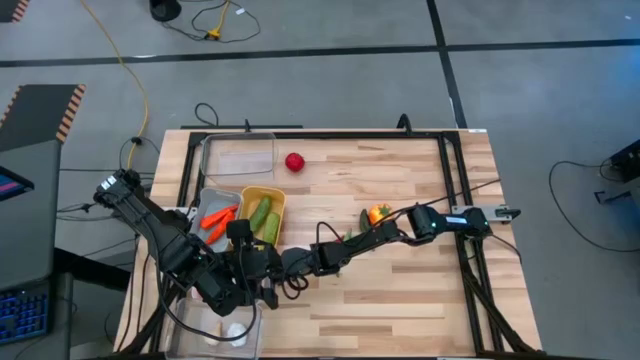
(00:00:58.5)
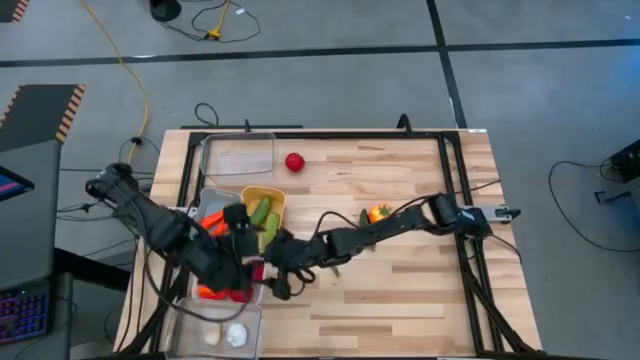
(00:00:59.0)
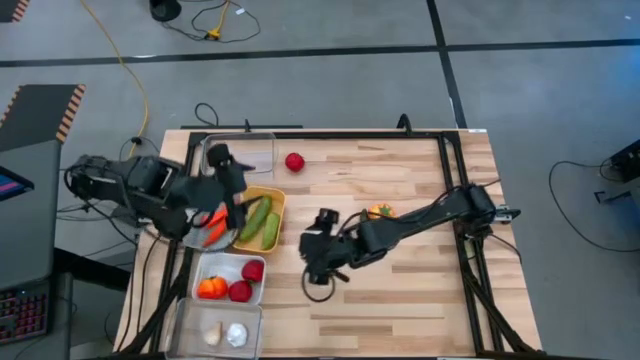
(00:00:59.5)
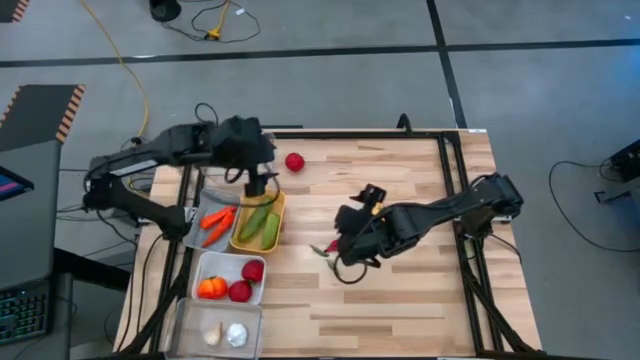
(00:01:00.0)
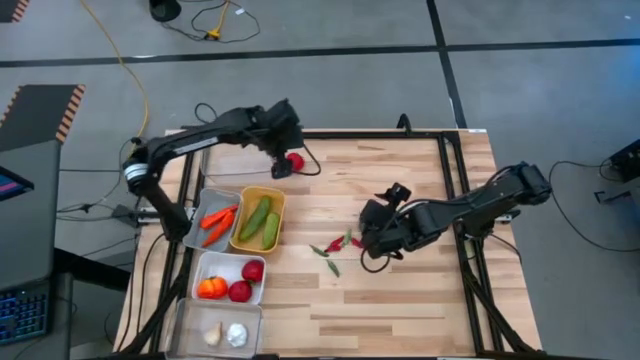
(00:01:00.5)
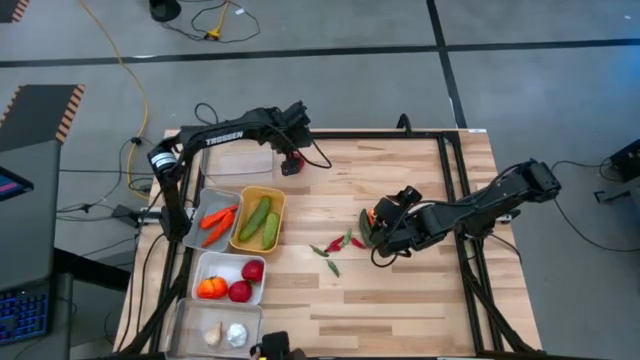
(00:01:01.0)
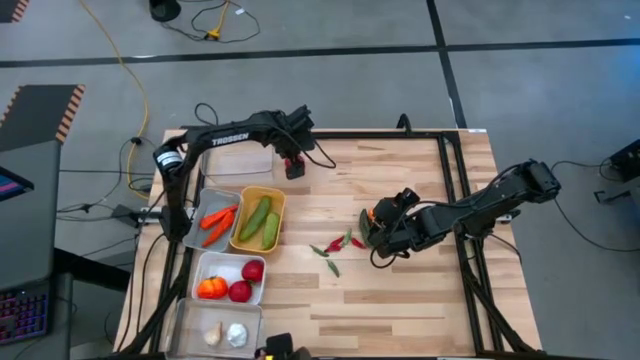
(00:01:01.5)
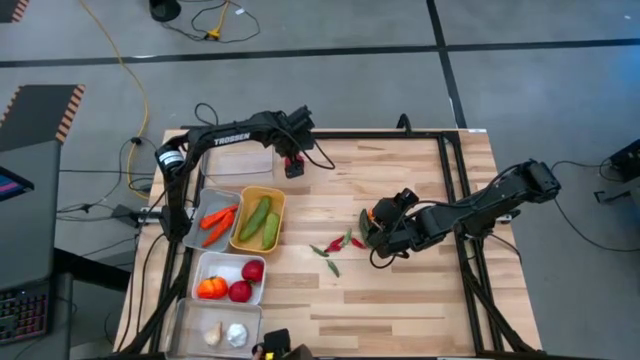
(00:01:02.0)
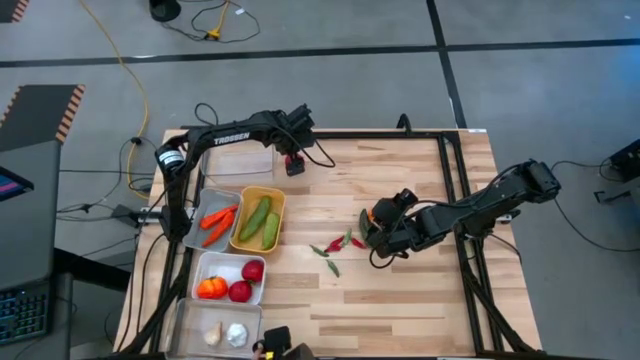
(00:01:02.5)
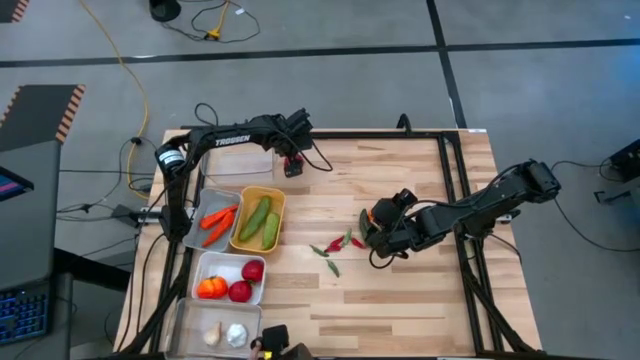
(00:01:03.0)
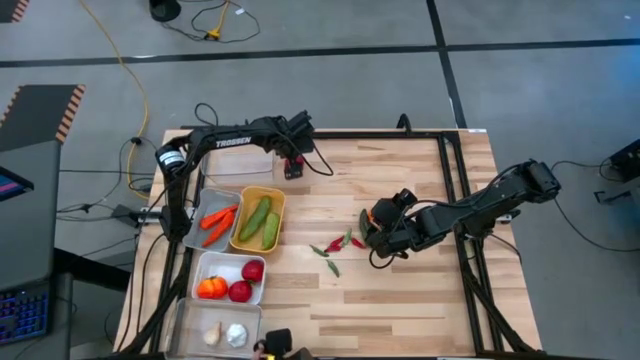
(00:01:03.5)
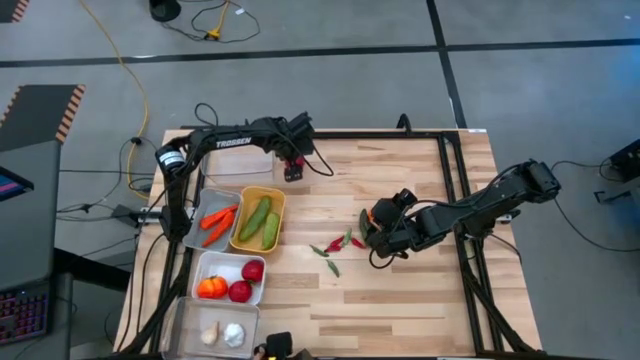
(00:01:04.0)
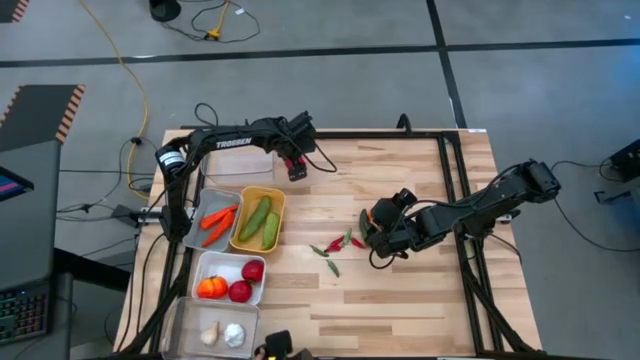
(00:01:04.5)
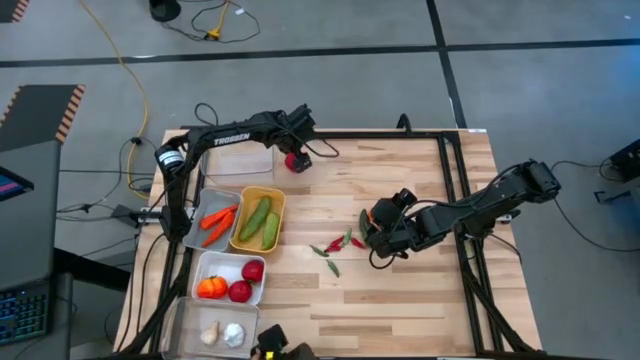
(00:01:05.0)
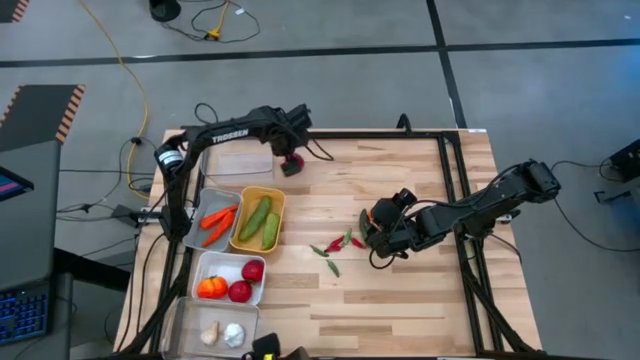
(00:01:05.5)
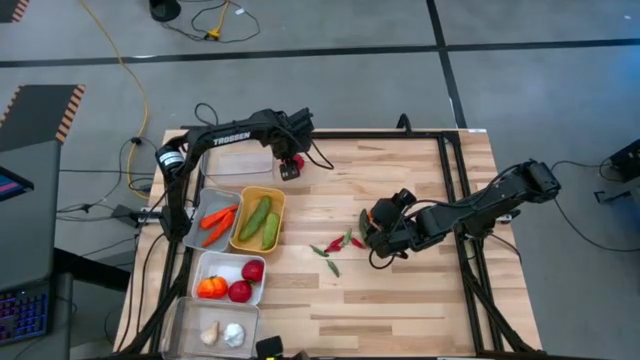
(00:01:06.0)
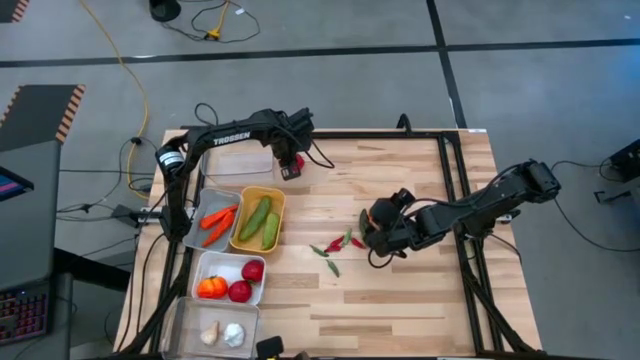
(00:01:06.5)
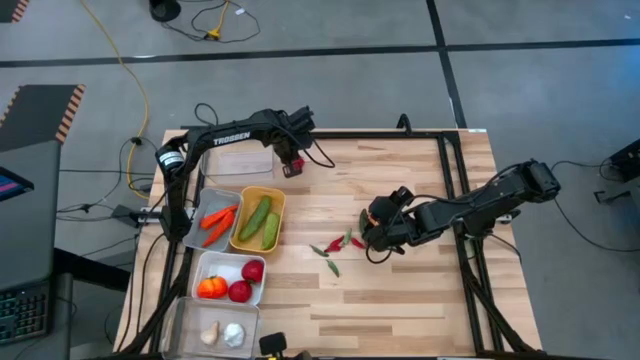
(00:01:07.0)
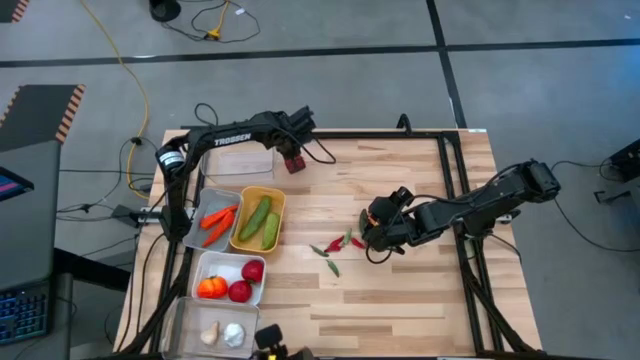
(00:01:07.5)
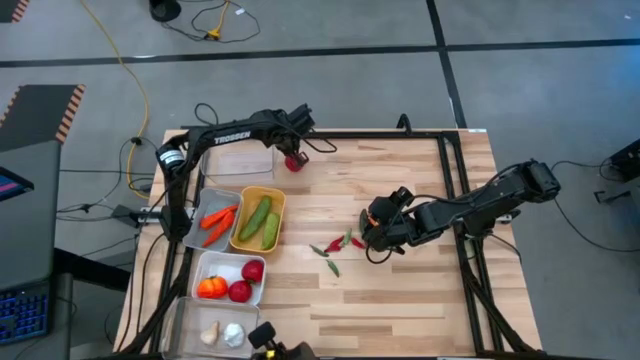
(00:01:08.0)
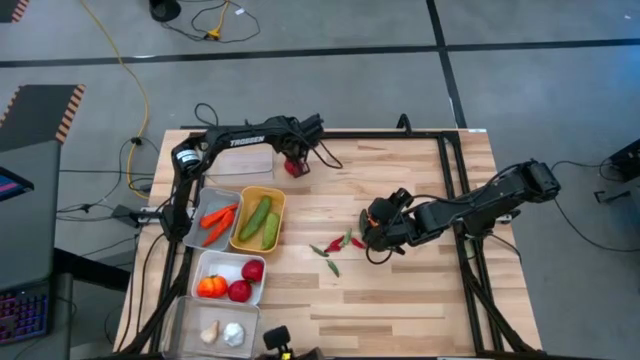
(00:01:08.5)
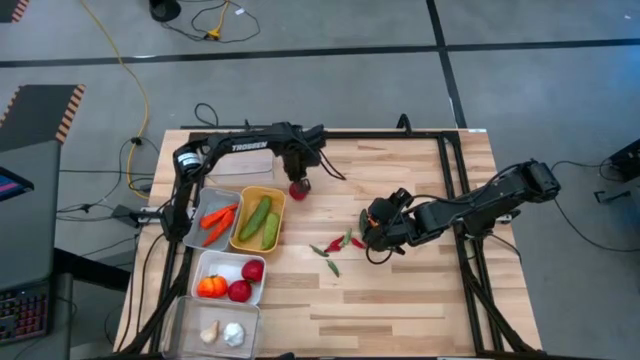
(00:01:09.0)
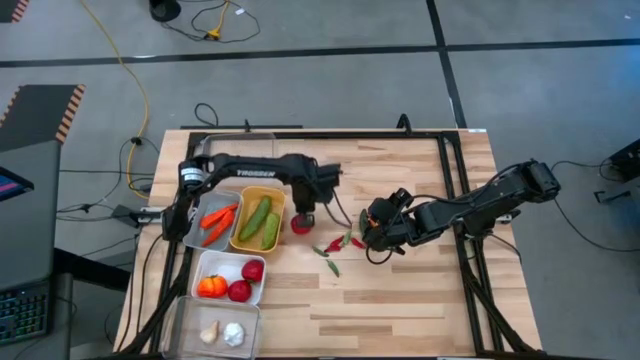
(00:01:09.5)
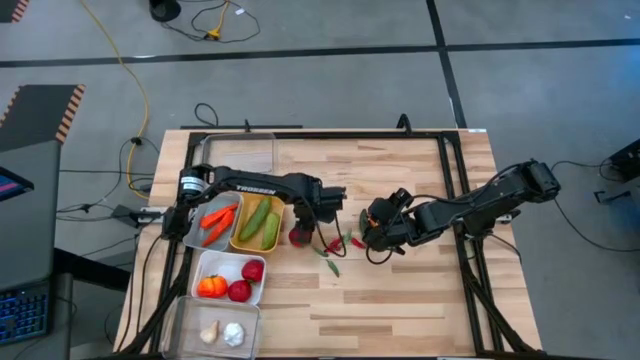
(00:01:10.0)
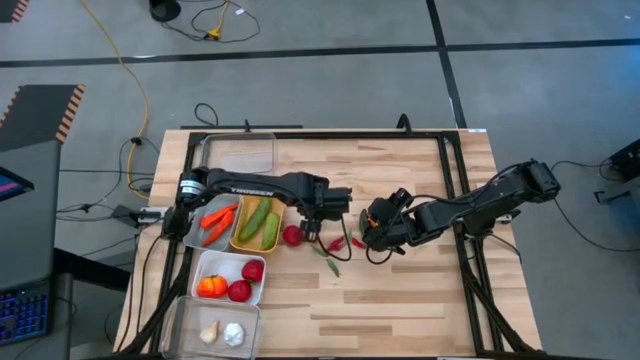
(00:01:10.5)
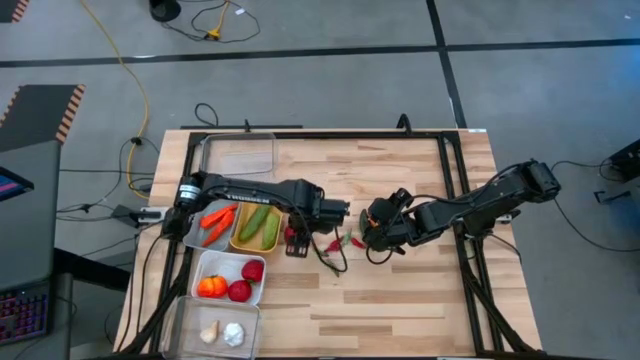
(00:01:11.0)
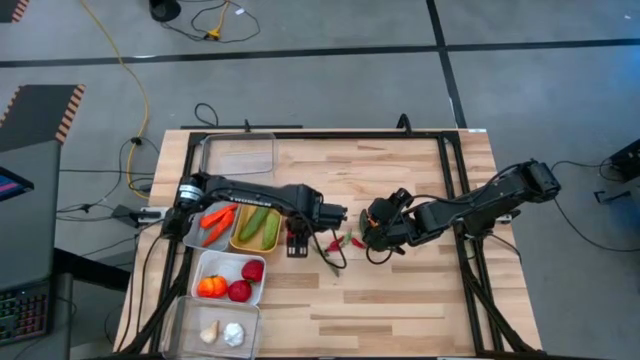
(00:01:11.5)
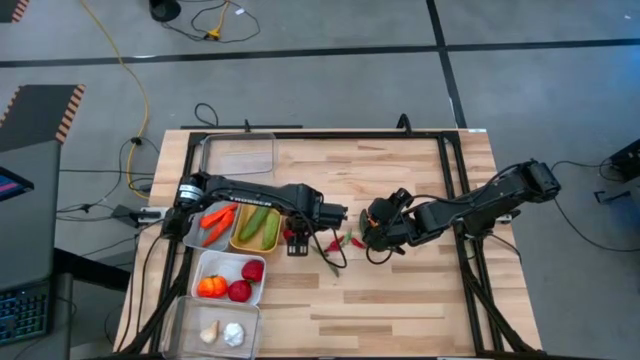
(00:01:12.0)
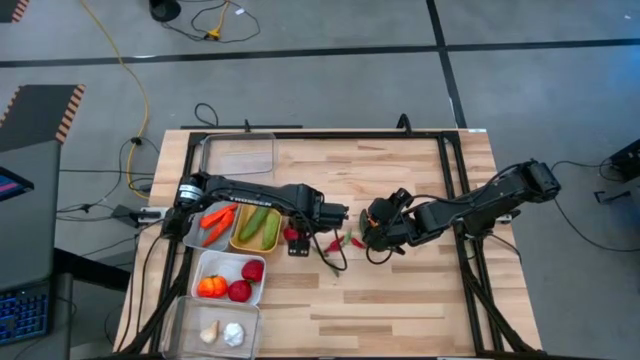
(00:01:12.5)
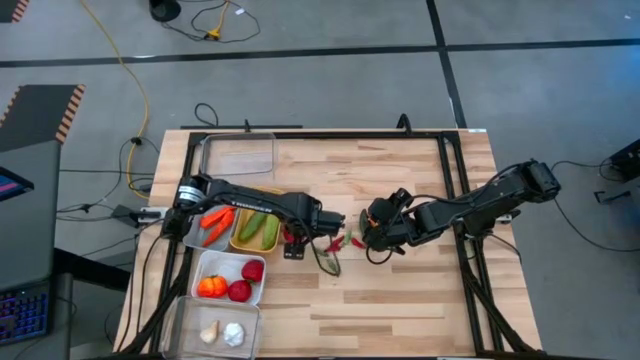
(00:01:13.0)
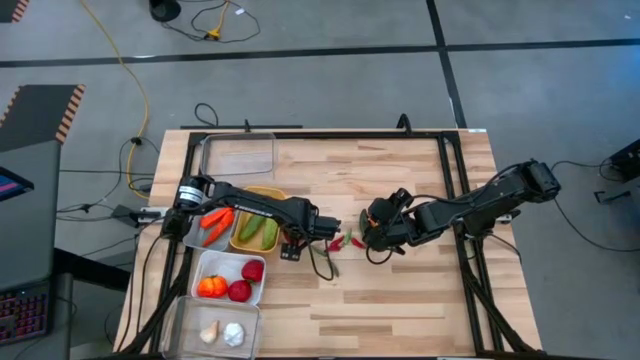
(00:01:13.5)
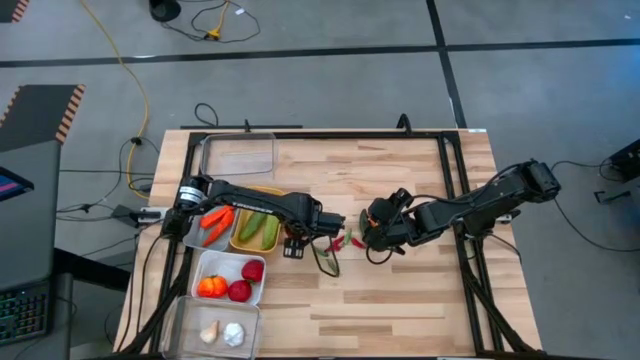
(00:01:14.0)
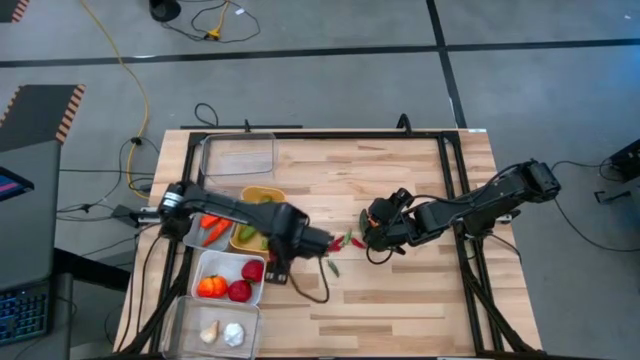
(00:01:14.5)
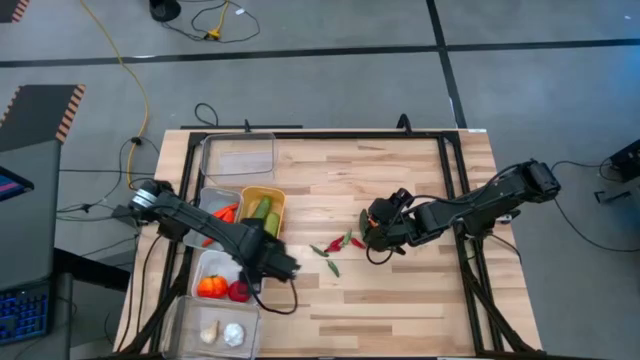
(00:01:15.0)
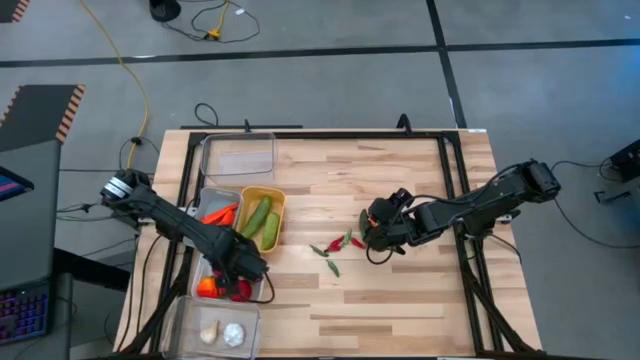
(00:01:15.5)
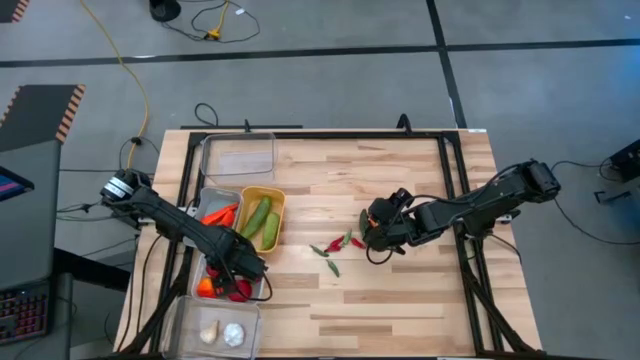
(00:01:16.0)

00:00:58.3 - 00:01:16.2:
Task: Sort produce into baskets
Put the top left tomato to the white bin
